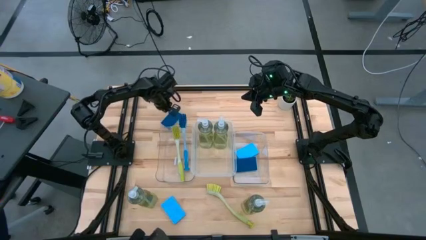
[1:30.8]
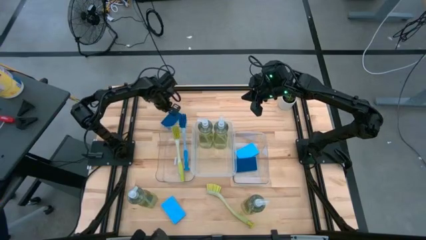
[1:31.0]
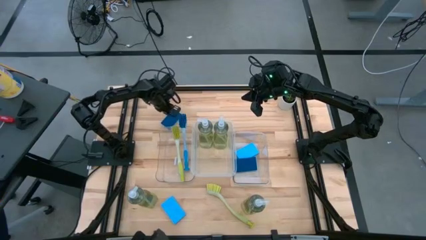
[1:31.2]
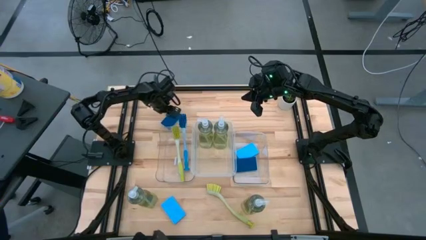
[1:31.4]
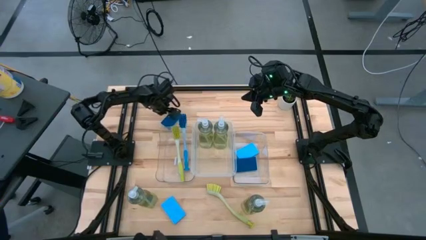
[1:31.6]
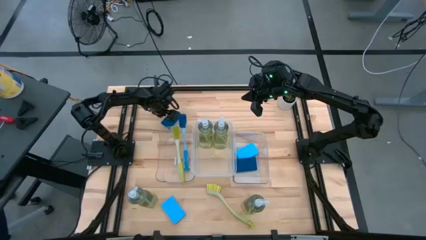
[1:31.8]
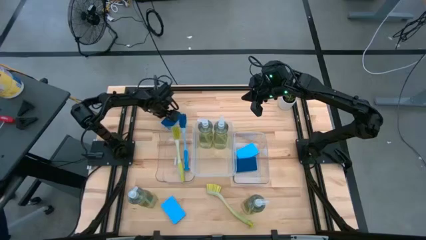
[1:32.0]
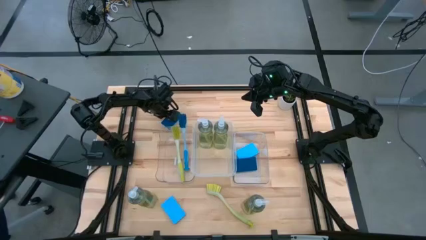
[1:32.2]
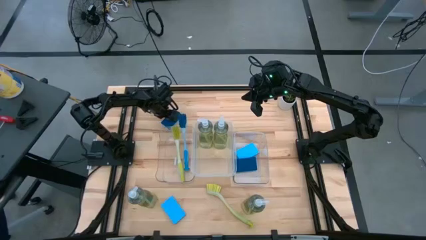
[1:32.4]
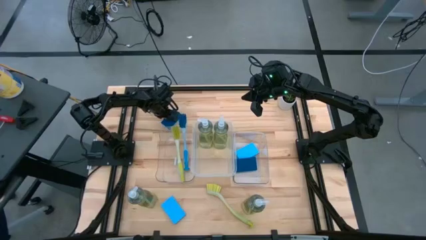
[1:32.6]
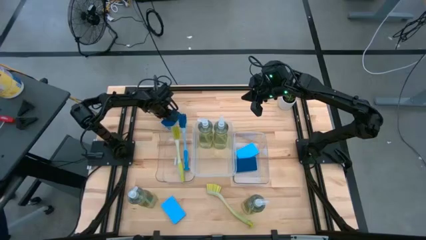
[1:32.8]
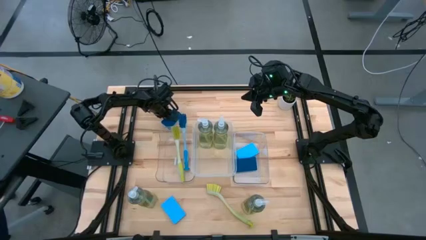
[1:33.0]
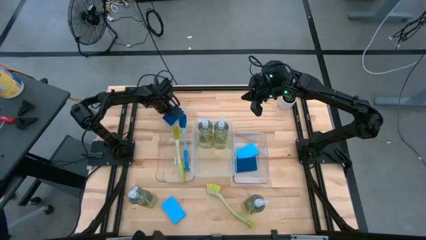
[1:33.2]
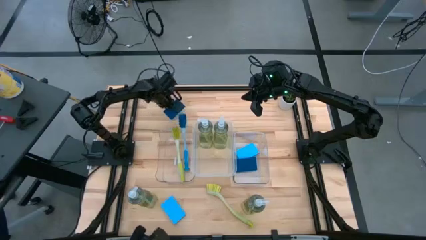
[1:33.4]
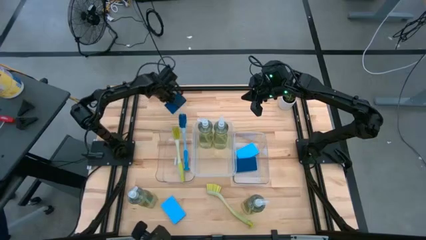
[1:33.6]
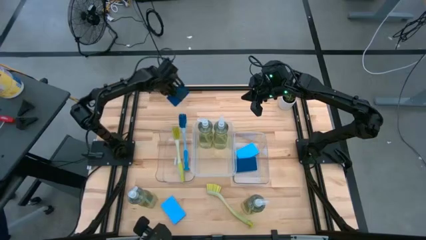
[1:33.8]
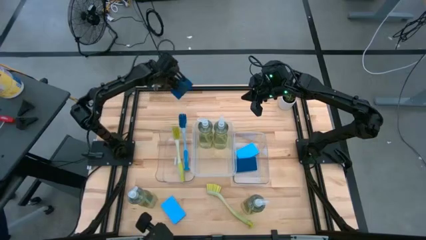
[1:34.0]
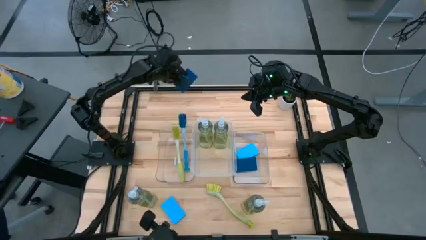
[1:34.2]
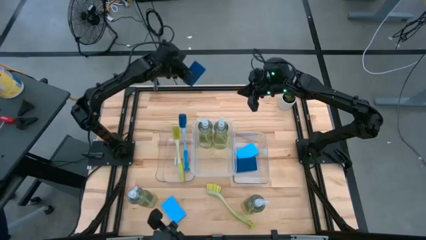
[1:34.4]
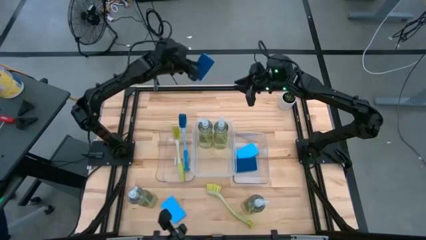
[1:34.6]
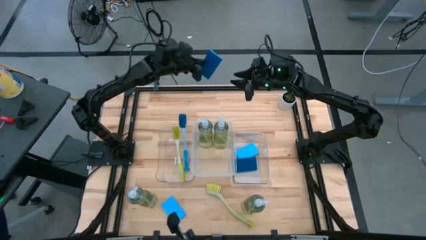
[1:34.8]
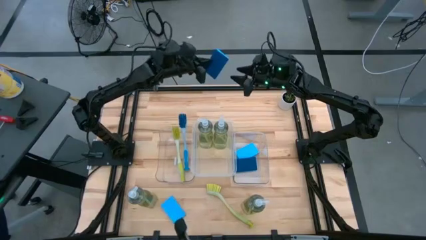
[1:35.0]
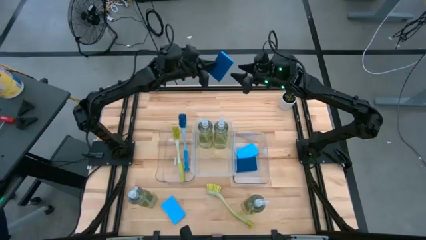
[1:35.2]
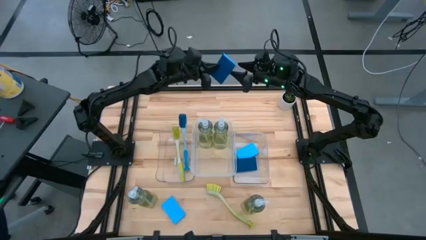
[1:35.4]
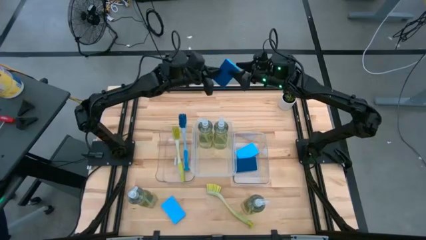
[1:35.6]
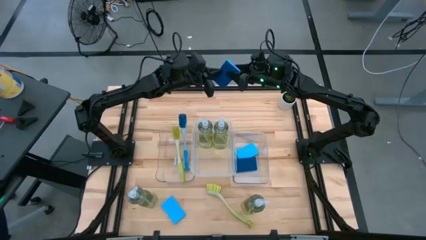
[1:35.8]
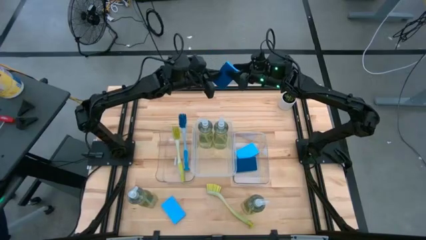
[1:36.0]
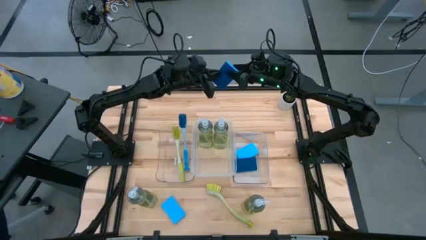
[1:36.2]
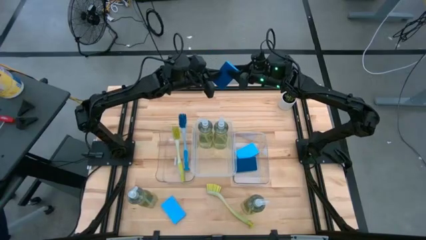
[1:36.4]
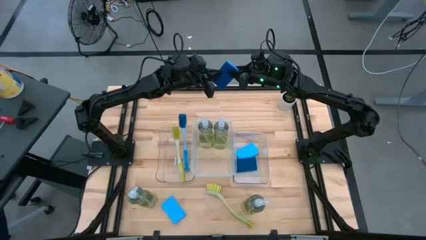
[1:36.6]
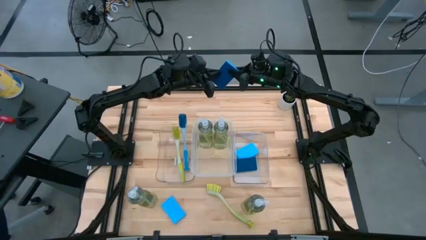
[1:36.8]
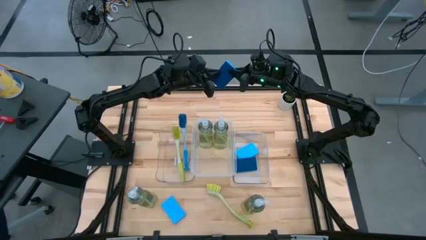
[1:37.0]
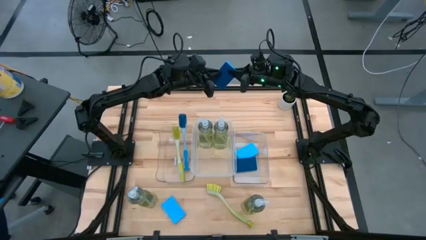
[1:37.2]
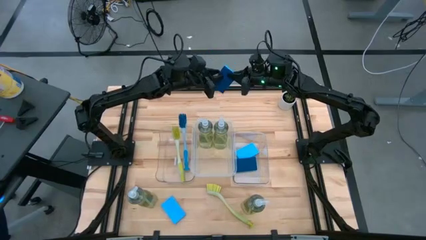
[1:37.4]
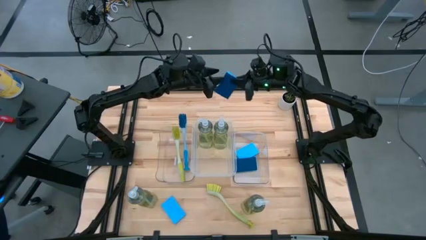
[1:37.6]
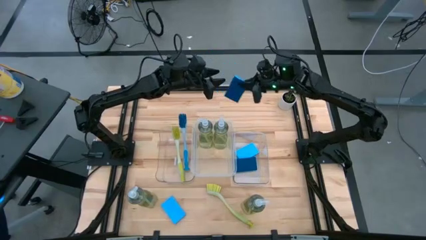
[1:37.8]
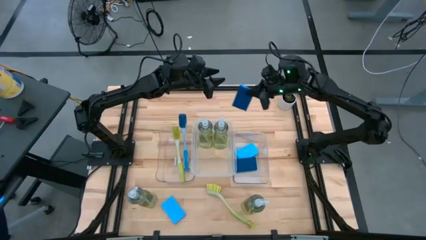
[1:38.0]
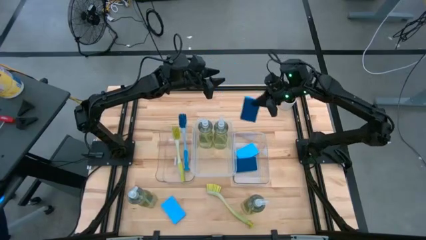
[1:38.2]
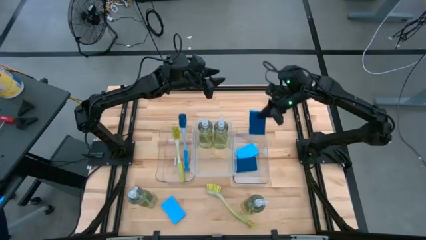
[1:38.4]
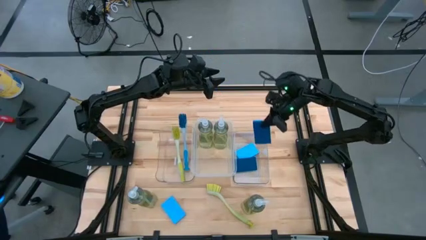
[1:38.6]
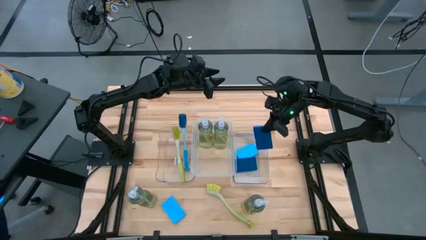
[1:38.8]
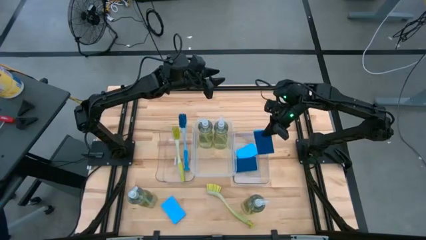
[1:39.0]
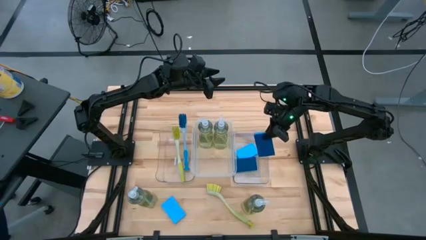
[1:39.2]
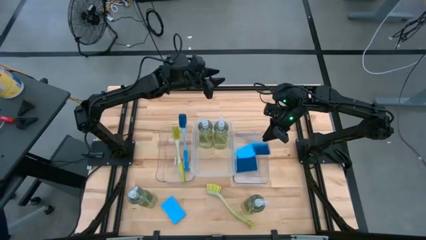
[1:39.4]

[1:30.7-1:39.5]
Task: Pick & Place Kitchen Sink Supplies
Put the blue sponge wipe into the right transparent bin

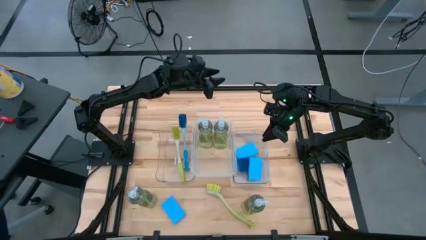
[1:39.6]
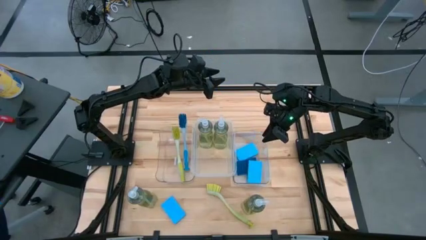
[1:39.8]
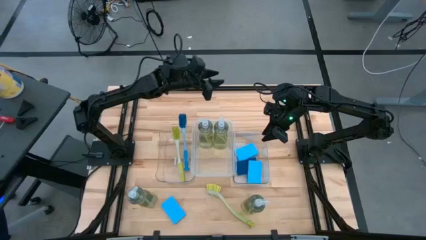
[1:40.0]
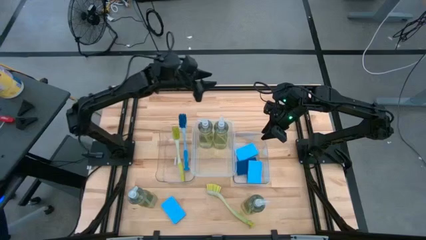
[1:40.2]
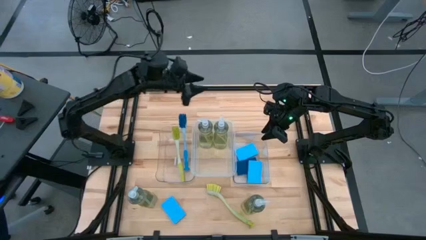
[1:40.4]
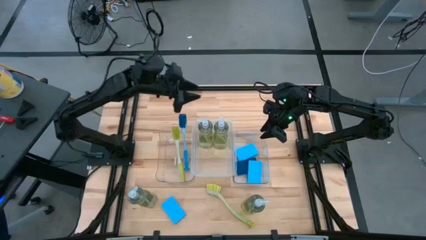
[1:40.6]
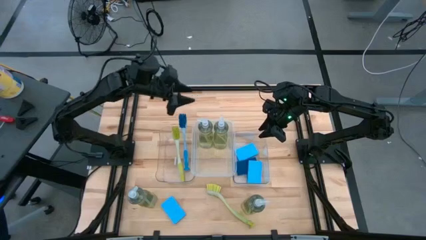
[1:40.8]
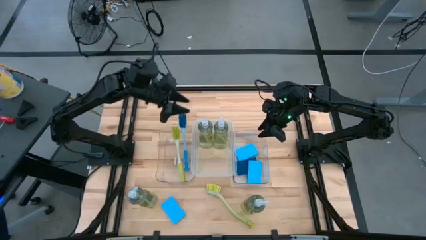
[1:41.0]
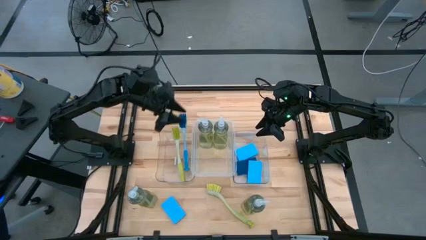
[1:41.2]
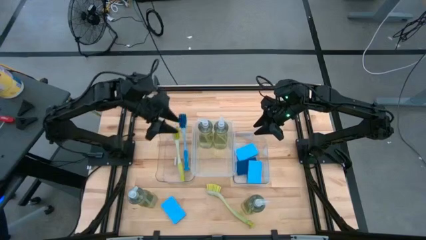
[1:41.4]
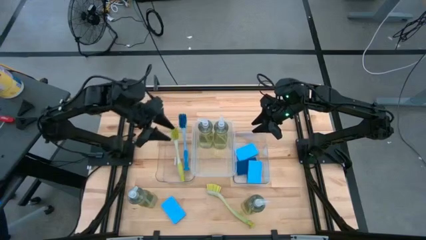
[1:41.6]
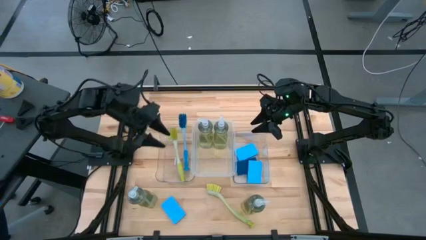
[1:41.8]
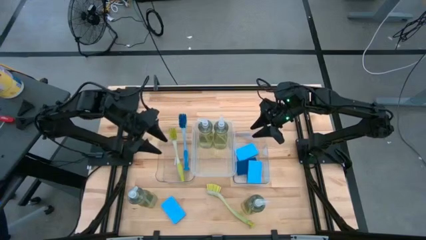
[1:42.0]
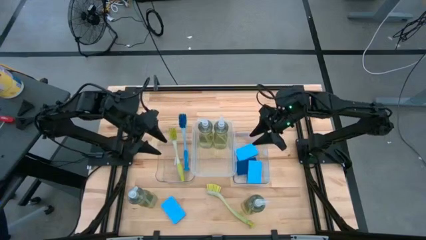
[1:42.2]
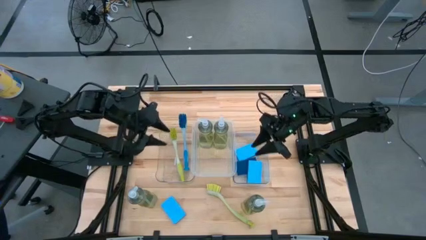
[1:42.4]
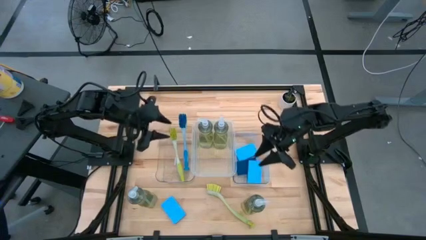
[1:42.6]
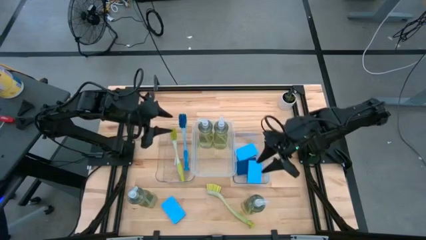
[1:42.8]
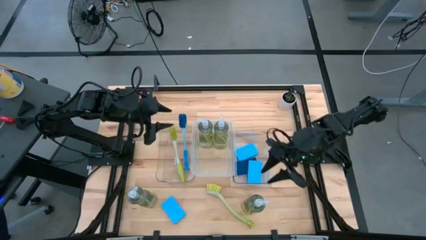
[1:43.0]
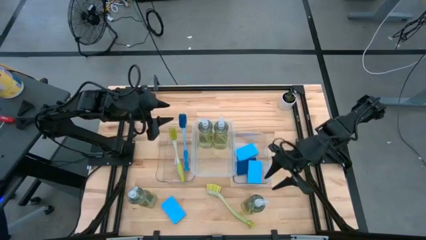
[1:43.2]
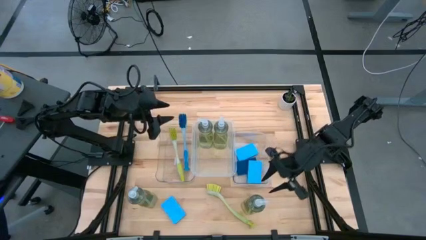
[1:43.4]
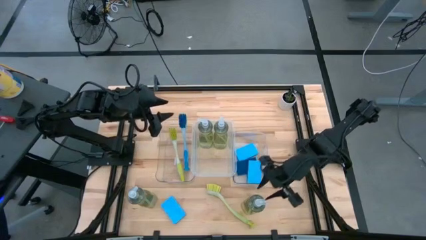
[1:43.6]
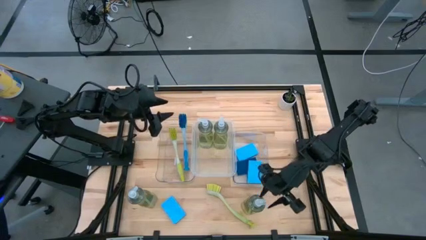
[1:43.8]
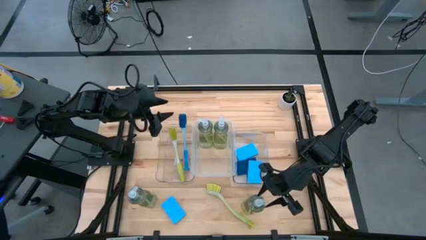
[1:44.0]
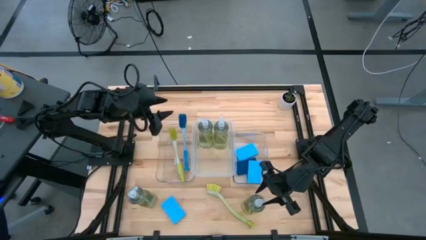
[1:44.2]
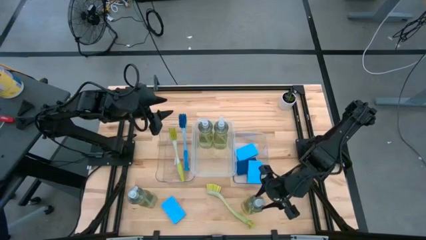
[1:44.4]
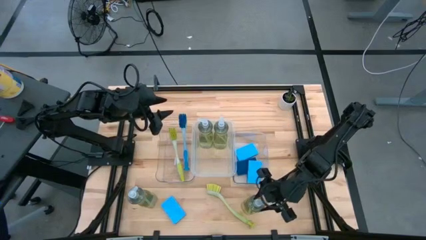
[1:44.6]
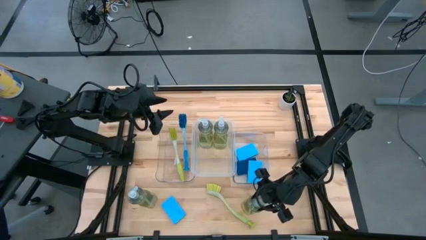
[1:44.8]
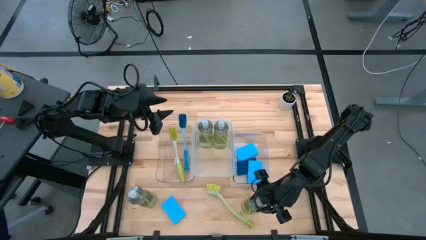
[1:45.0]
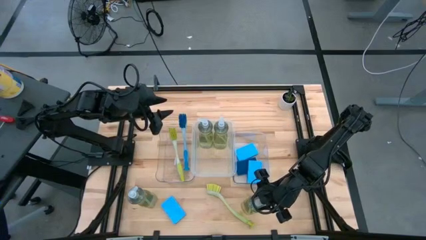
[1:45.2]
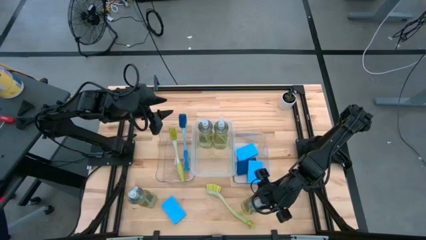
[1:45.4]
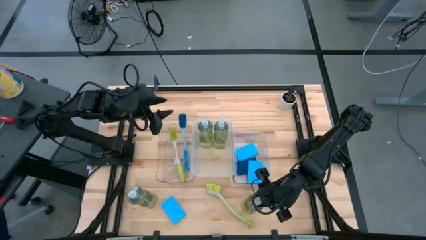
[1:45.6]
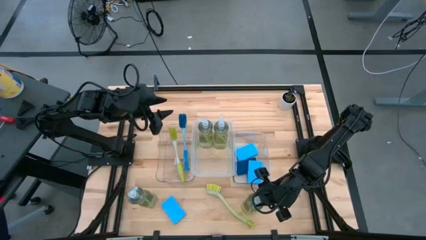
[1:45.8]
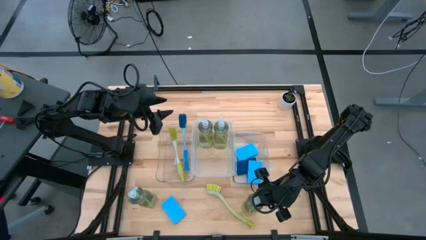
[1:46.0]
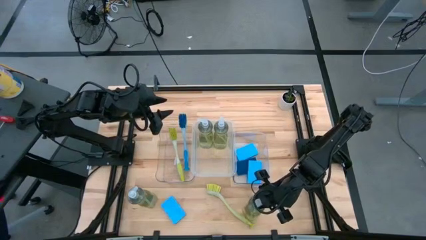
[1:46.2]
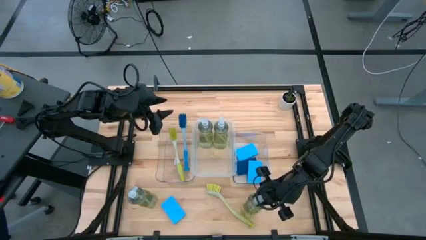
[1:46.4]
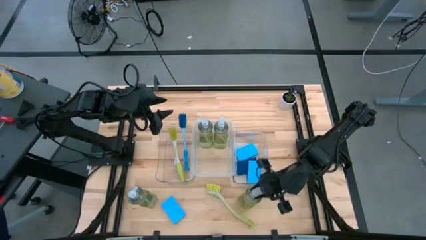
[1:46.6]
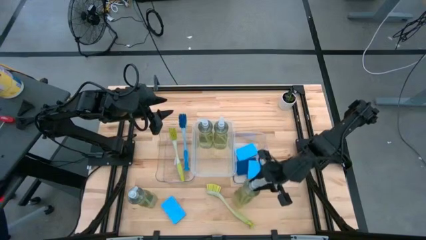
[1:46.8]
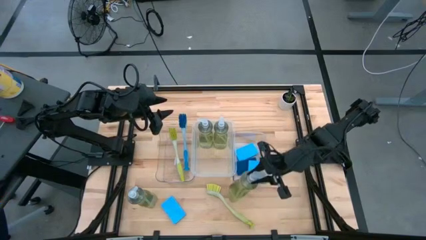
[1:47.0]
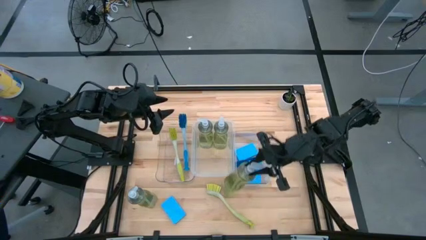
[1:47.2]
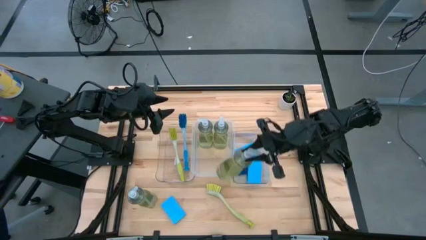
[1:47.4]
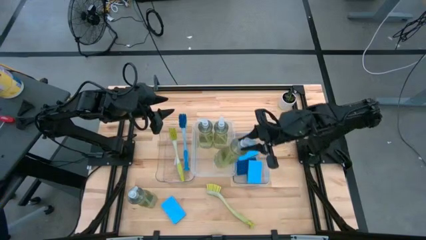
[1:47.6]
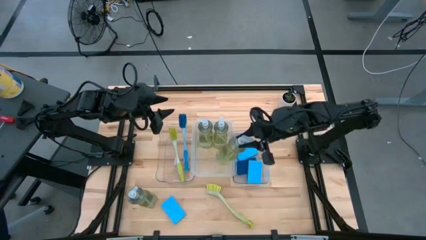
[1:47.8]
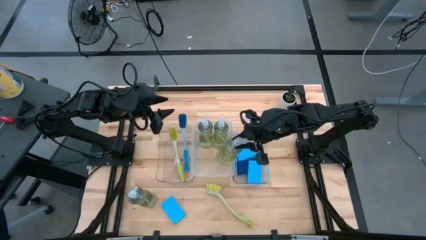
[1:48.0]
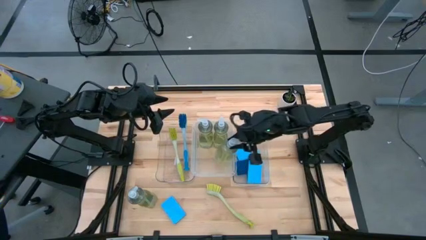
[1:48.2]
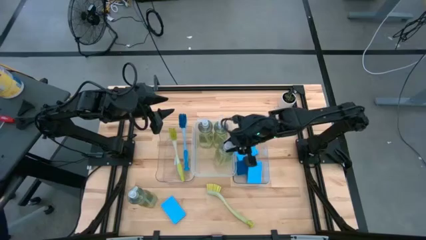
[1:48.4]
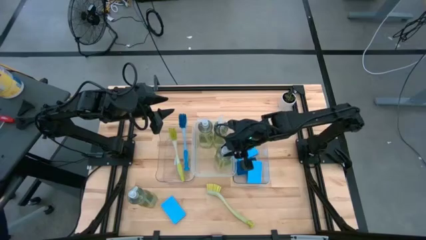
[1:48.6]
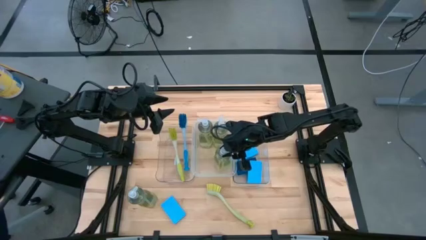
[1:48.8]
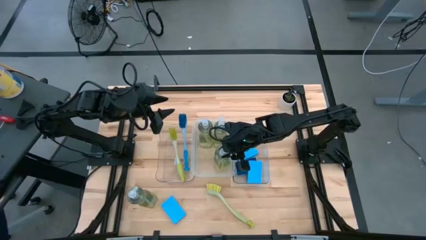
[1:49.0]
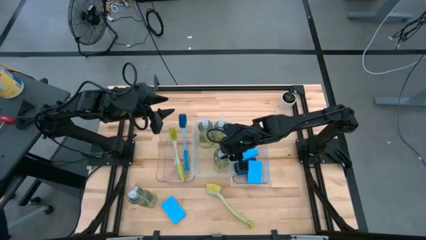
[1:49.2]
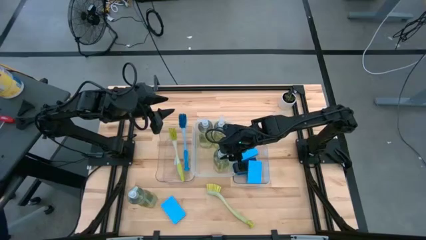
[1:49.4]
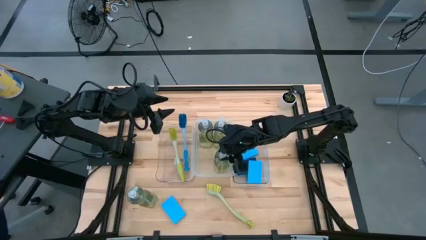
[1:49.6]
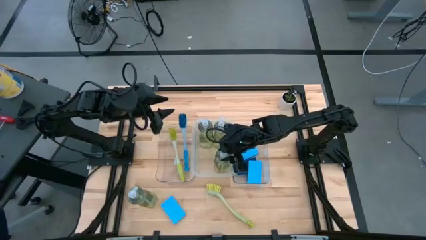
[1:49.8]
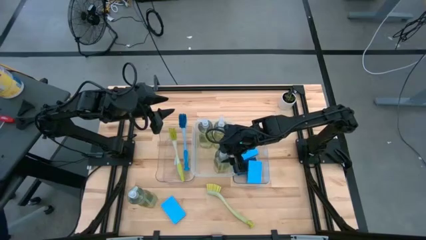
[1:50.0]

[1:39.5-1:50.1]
Put the transparent dishwashing liquid dispenser into the middle transparent bin
